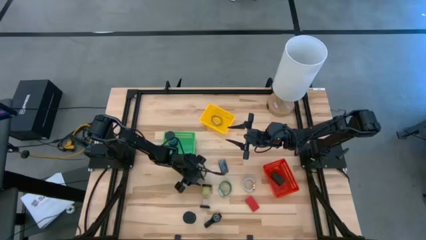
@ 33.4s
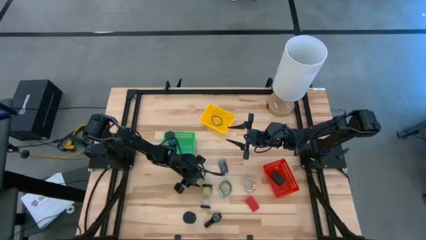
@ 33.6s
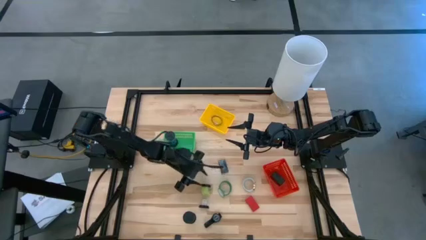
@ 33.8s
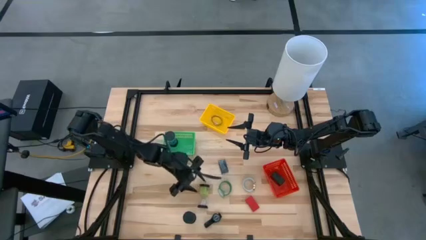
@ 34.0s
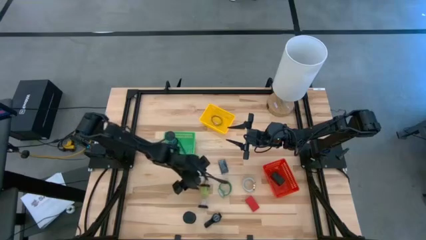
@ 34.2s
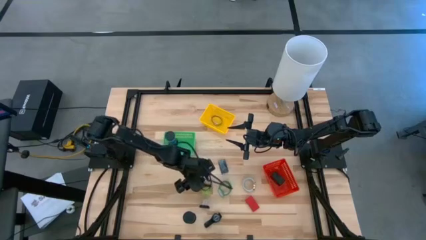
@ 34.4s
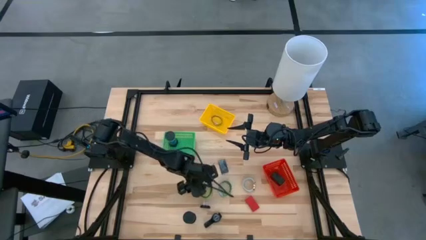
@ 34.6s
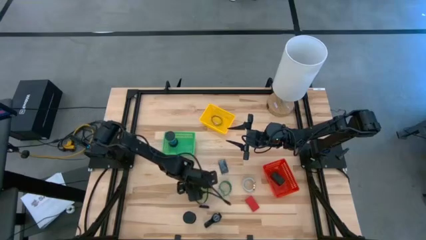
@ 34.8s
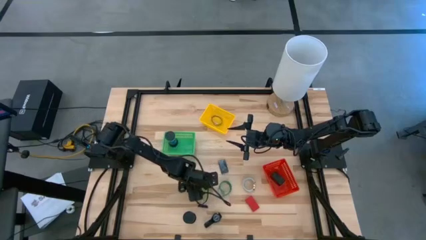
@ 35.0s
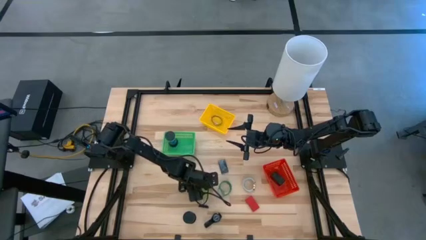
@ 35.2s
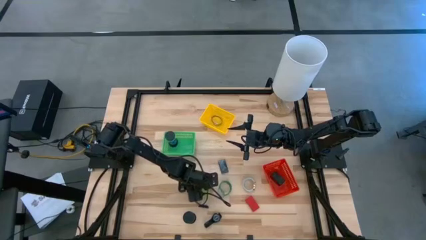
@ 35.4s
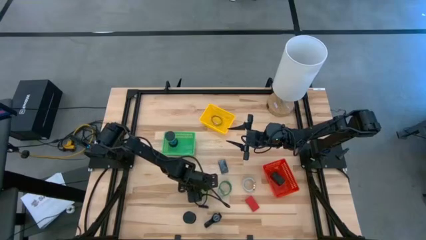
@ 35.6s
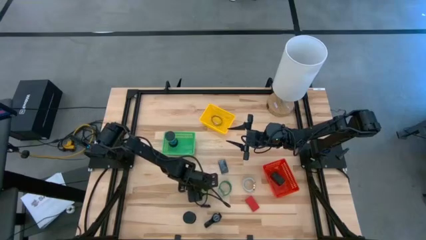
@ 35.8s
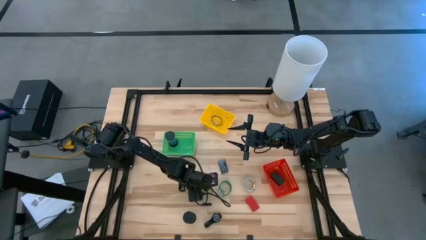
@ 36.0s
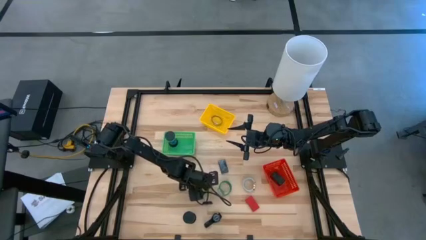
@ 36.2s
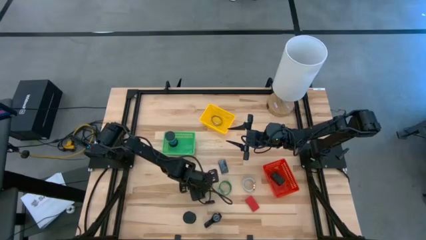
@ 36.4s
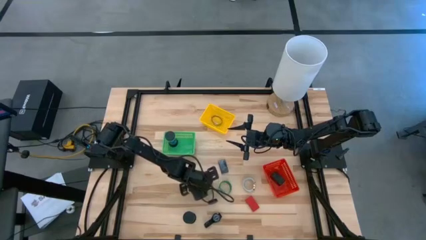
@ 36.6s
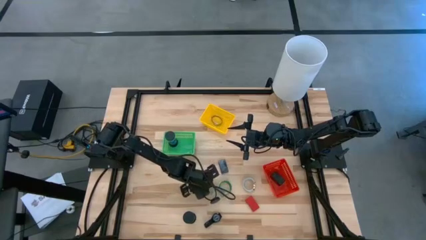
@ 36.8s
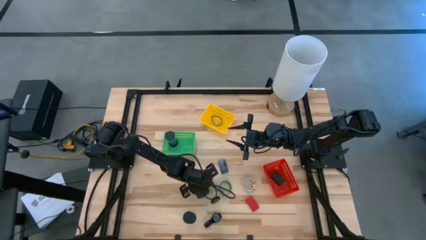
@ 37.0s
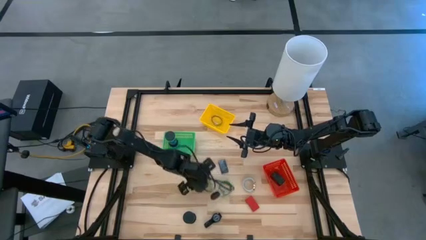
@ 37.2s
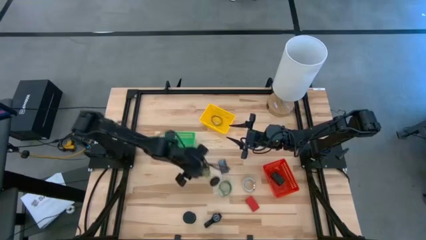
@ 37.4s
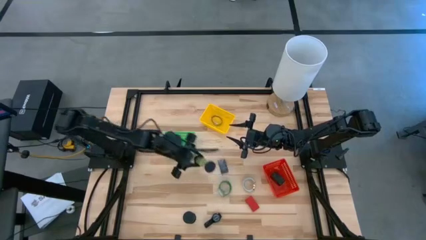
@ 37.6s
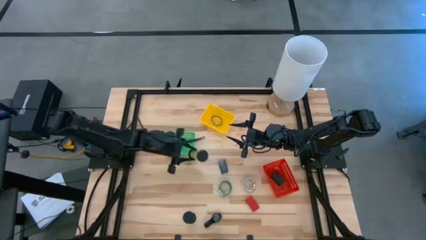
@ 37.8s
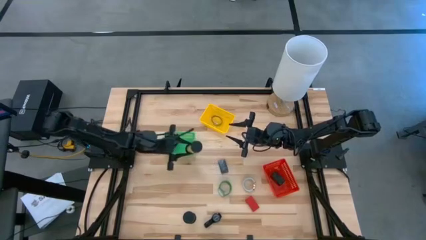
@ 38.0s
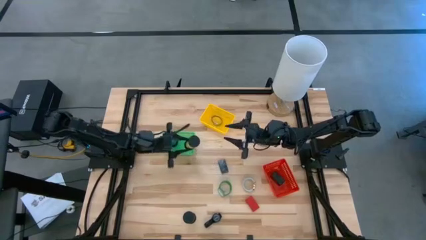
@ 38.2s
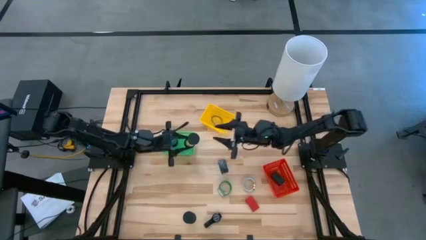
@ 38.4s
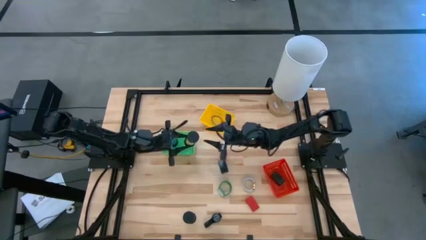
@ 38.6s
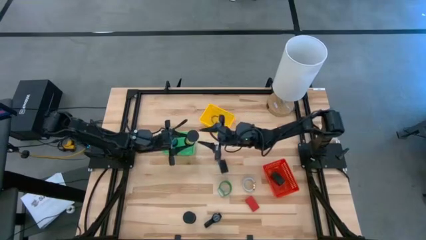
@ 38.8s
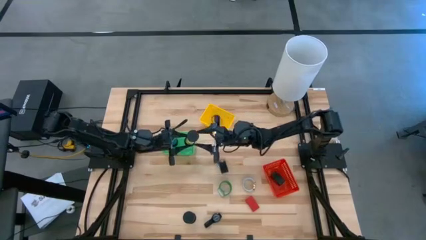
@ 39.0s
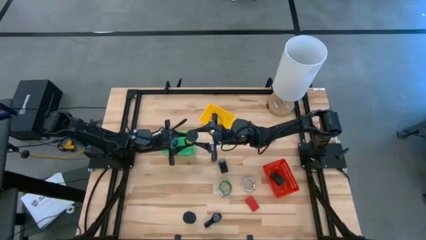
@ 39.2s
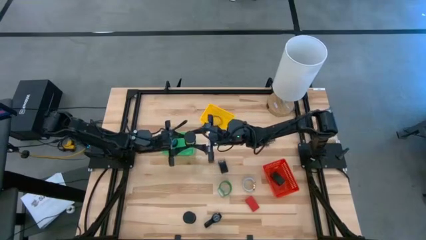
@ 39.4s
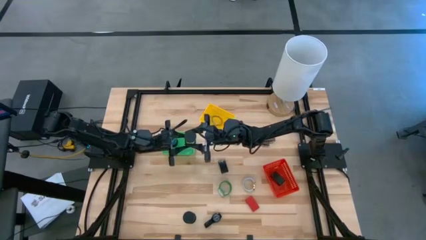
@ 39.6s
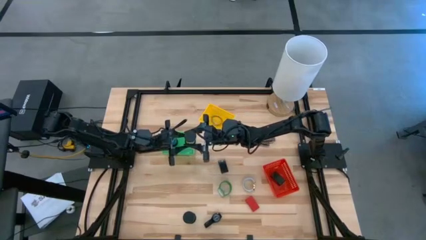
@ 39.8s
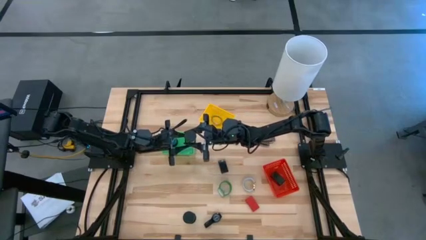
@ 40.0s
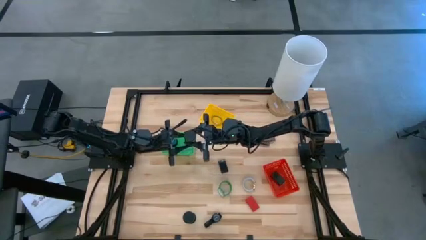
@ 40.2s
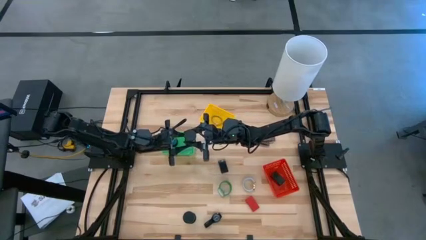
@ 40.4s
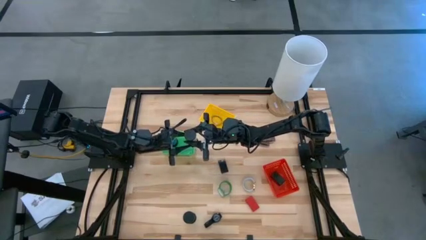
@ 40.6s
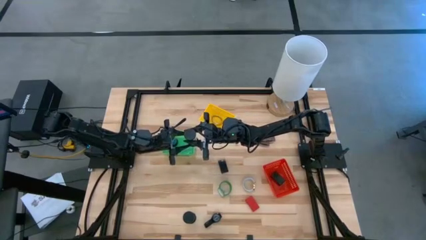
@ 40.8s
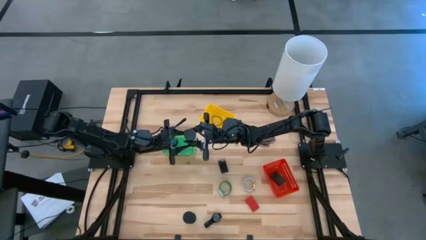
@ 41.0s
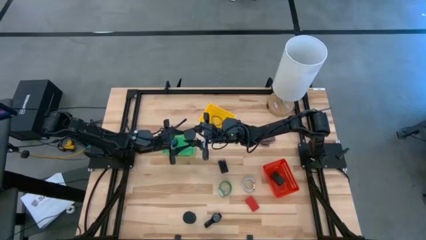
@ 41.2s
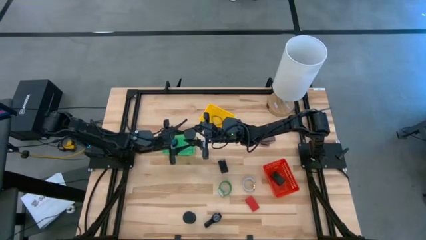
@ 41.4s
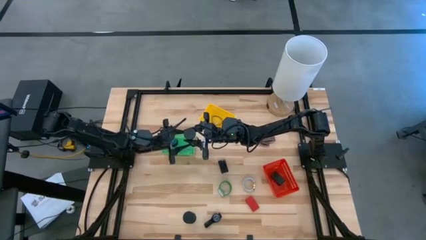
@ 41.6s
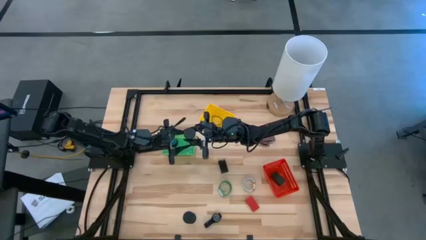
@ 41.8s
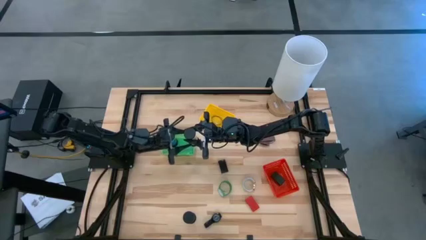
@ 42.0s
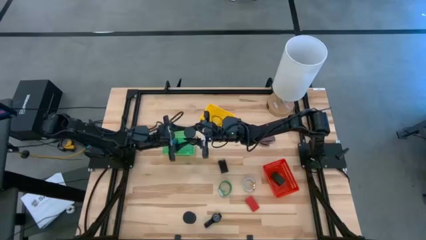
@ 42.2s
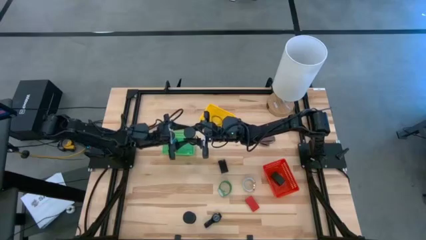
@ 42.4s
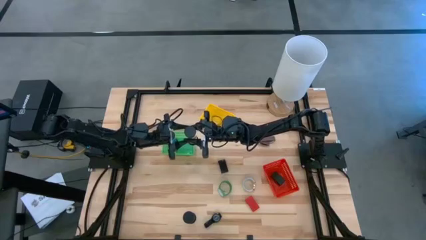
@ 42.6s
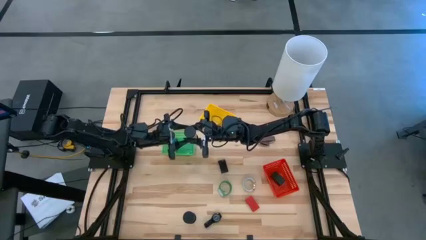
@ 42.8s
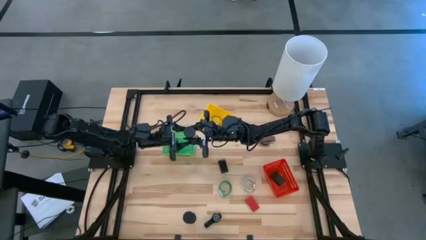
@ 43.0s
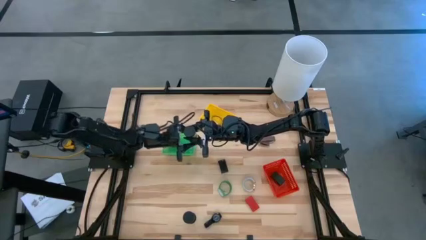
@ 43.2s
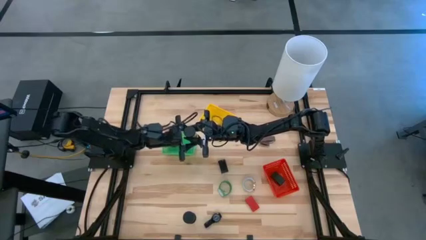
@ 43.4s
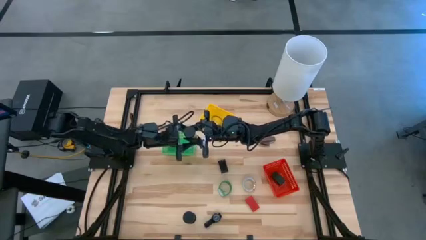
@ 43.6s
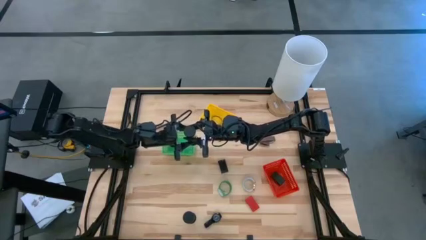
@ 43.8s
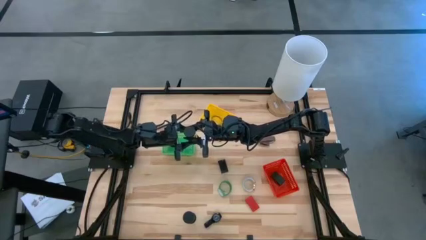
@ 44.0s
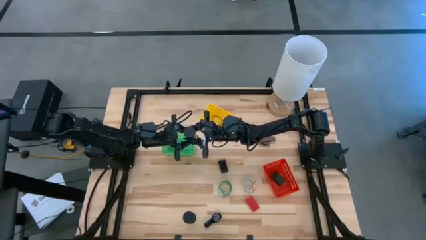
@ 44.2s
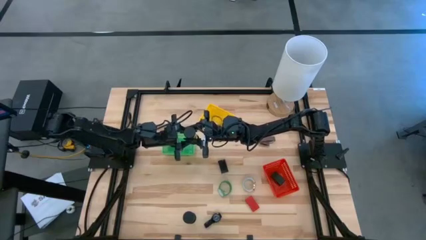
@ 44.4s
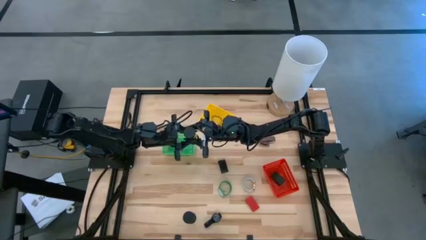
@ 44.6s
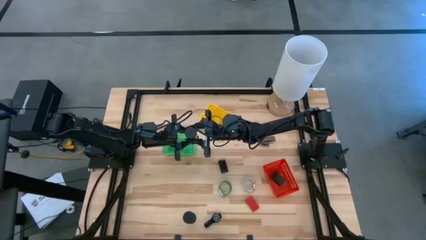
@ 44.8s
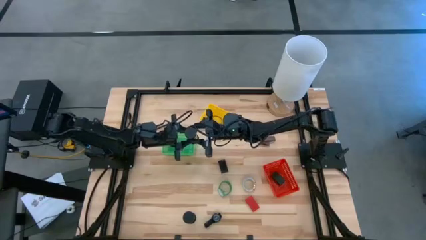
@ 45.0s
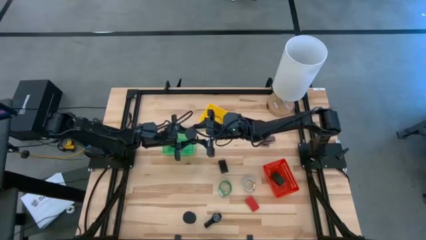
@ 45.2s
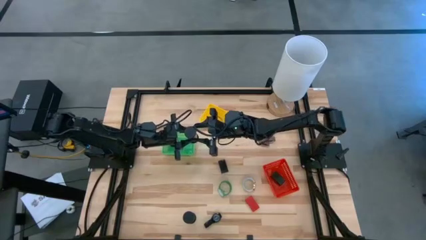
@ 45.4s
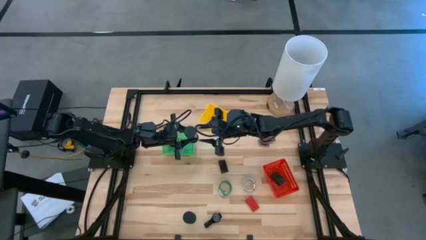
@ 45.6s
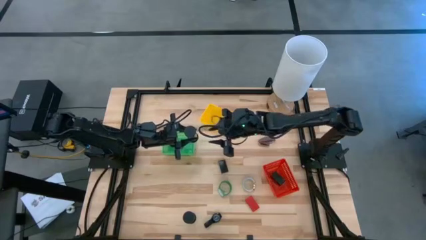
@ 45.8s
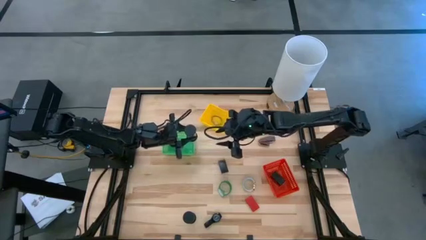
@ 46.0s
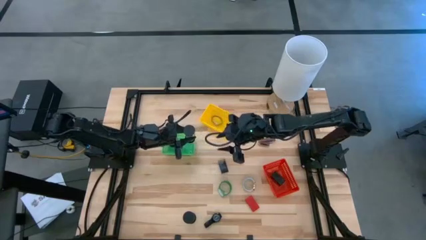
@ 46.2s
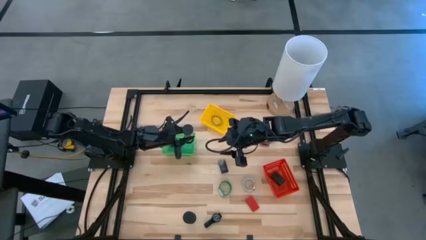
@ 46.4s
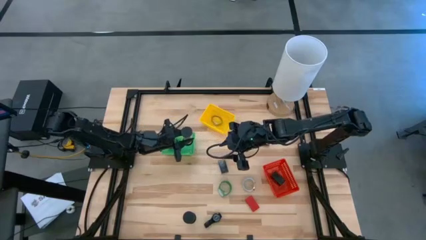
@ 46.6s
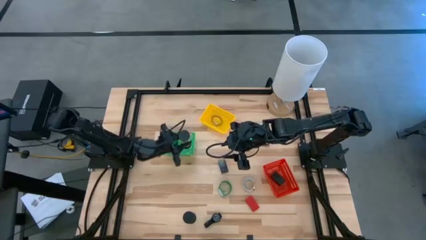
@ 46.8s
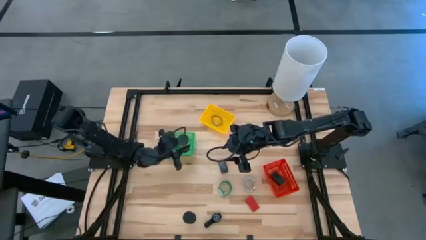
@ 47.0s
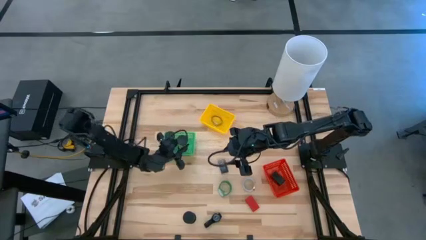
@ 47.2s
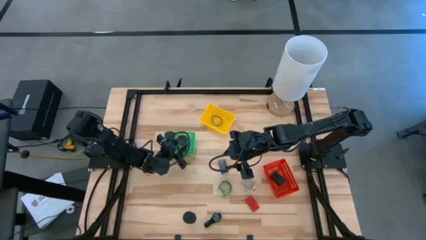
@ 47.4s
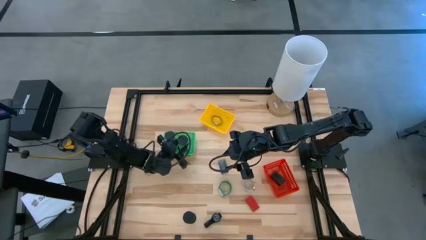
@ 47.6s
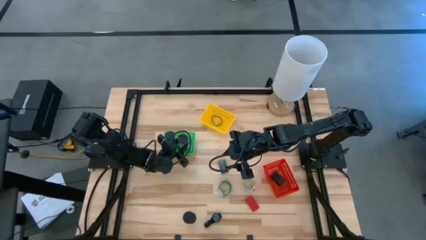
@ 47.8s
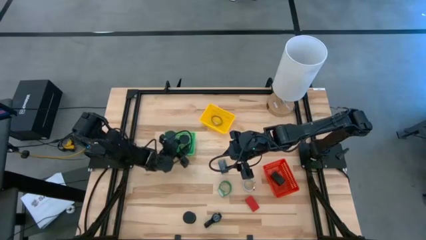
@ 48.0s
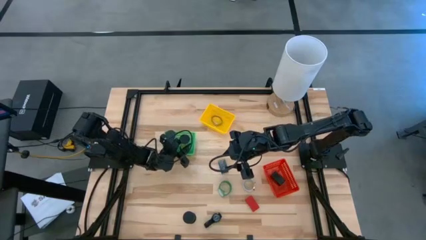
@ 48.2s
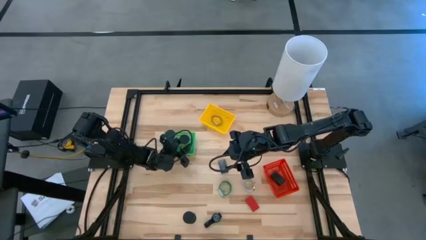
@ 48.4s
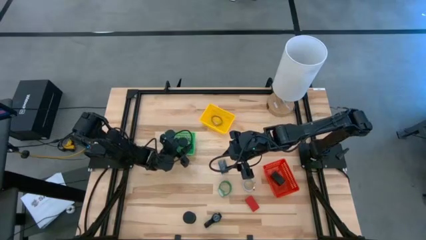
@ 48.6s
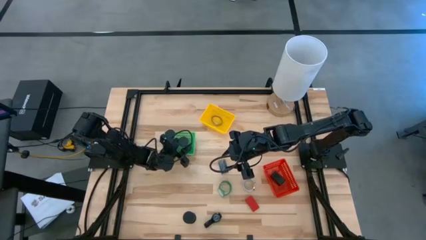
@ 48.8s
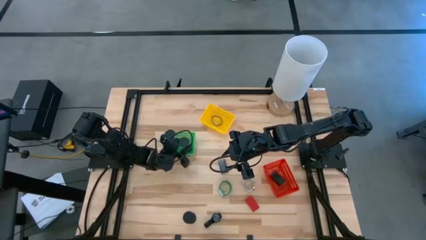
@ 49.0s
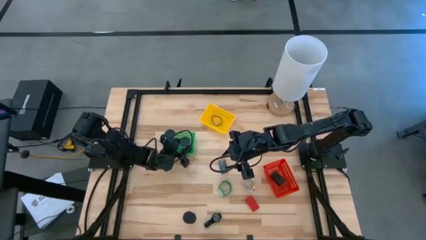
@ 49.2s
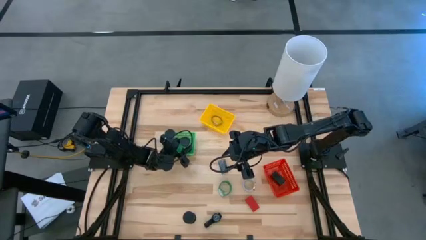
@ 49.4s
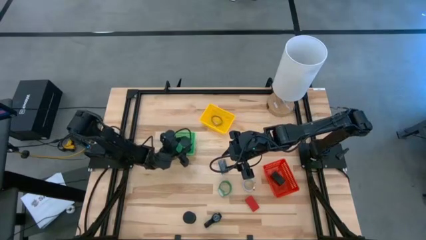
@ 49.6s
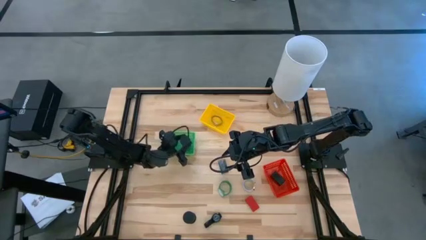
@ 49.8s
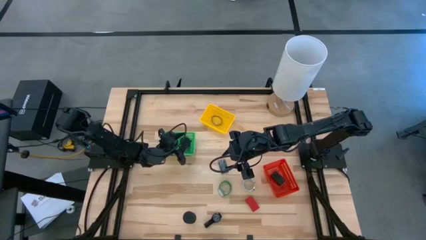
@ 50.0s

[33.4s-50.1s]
Task: Pick & Place Office items
Put the top green hourglass into the green basket
